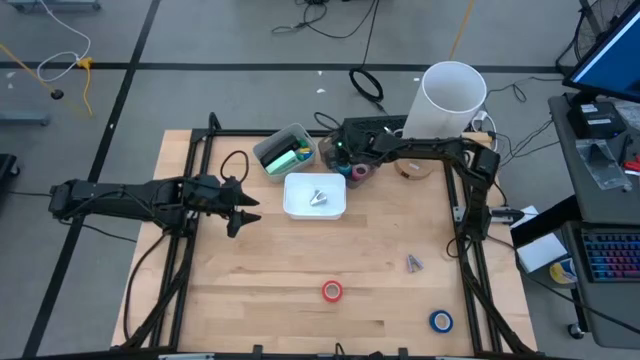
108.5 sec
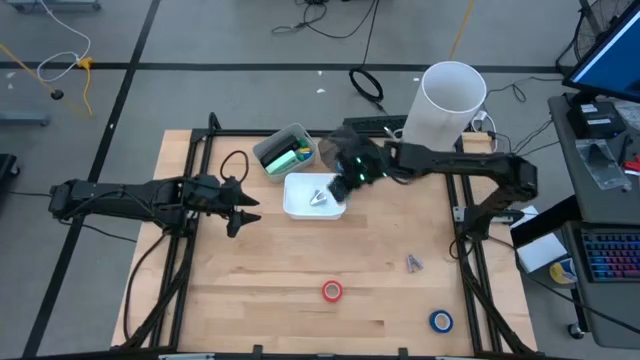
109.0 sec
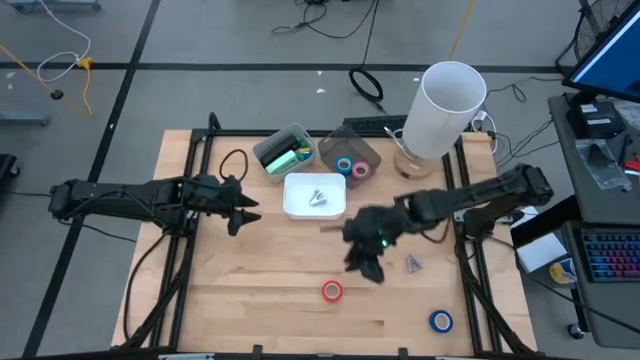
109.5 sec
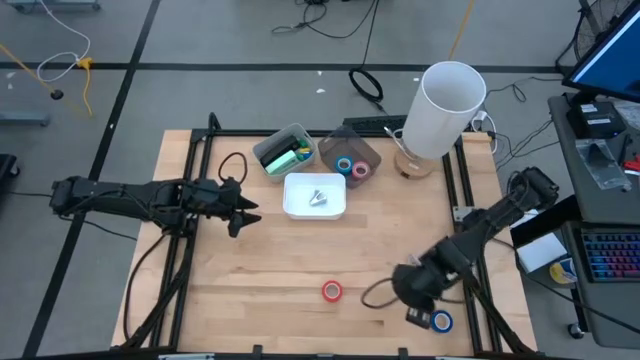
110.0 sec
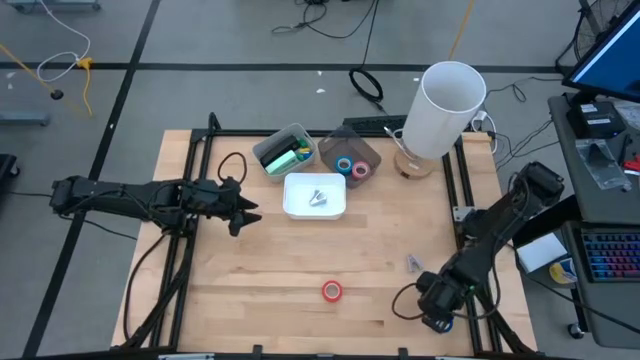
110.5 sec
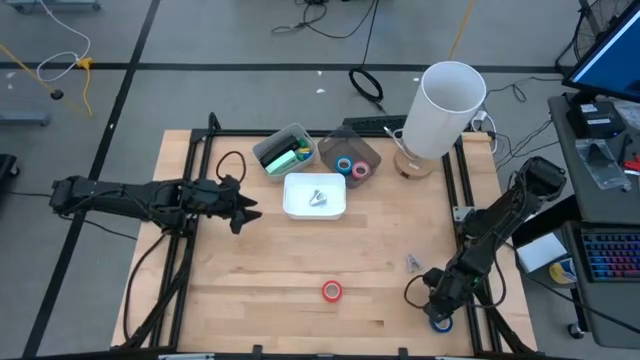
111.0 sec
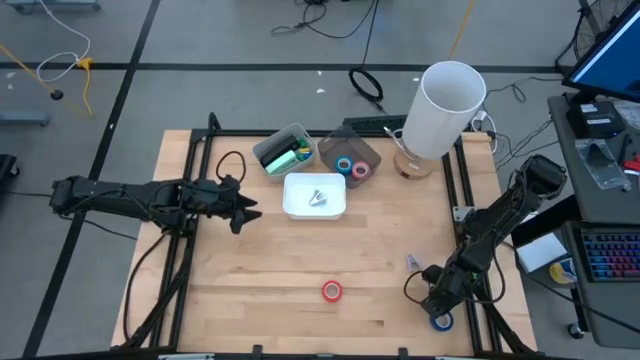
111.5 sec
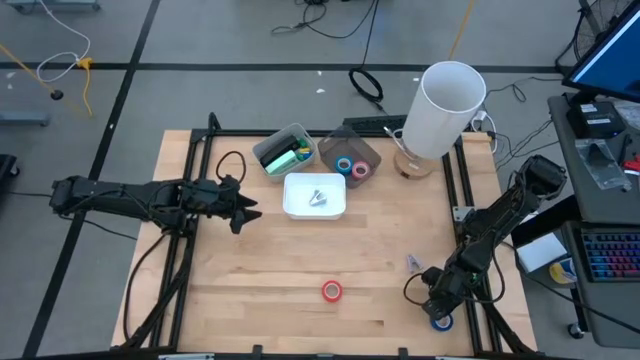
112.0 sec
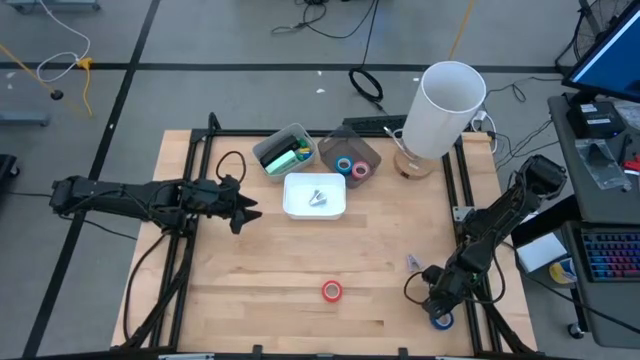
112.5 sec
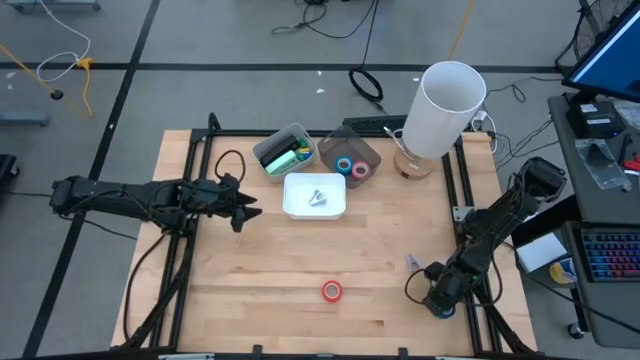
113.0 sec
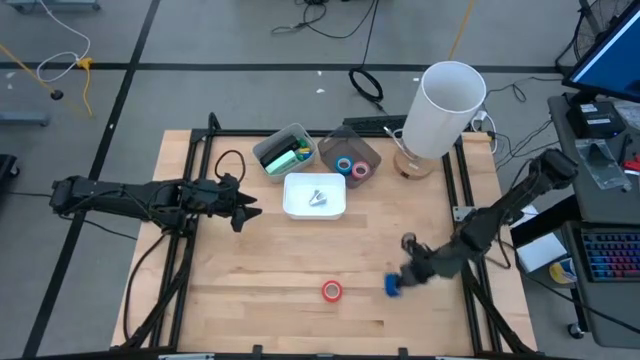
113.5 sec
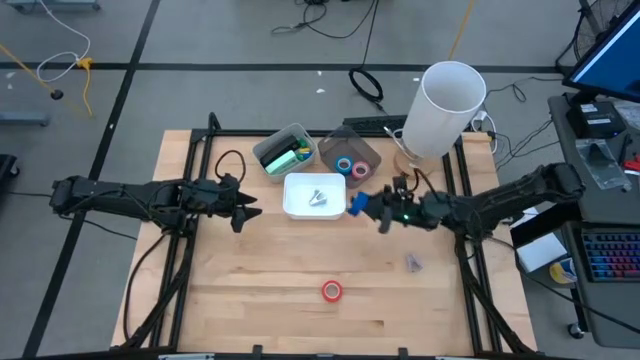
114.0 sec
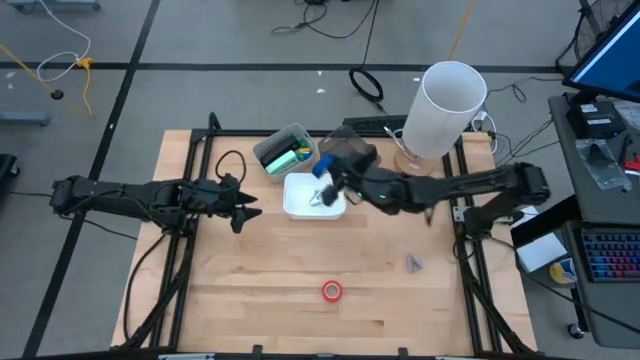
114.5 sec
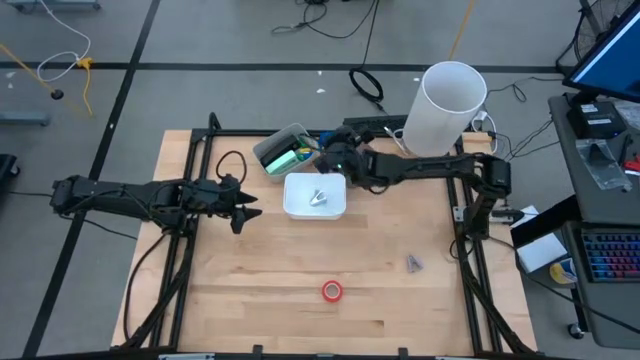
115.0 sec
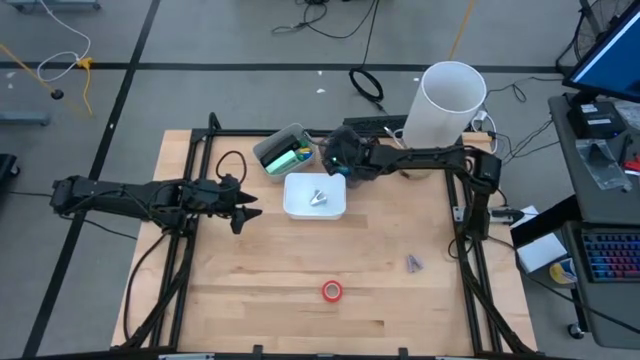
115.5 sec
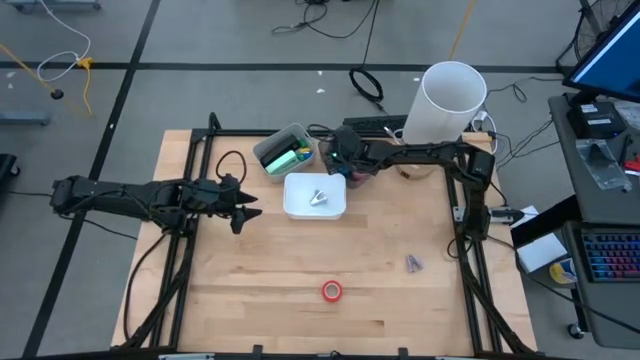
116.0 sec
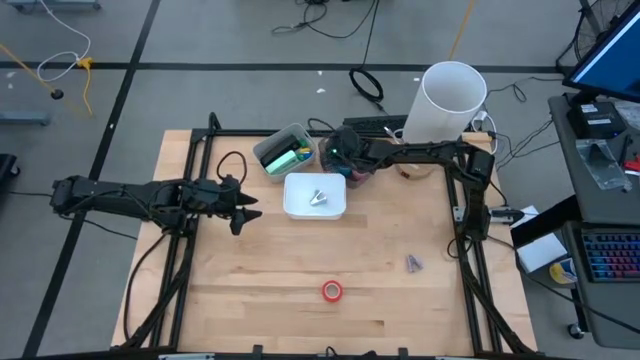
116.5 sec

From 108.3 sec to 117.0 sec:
Task: Pick and place Stapler, Stapler remover, tape
Put the blue tape into the black bin

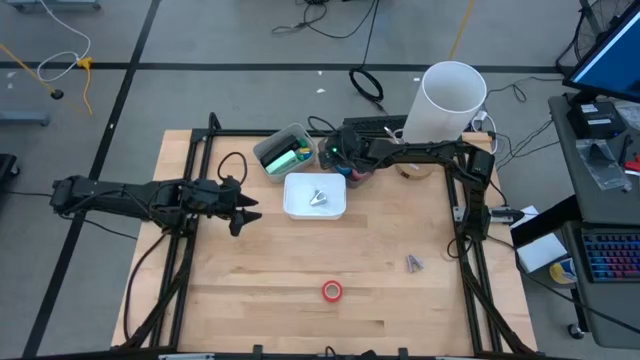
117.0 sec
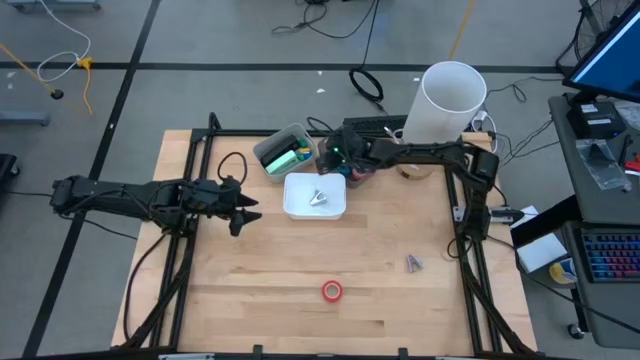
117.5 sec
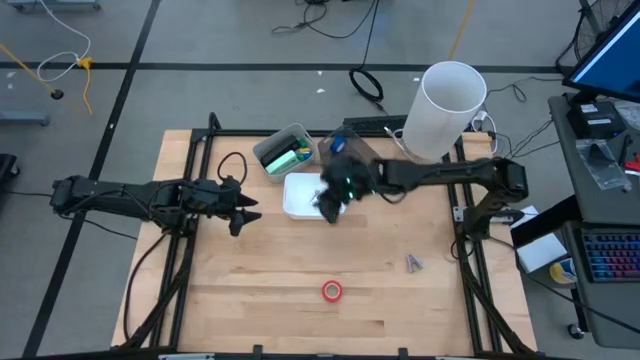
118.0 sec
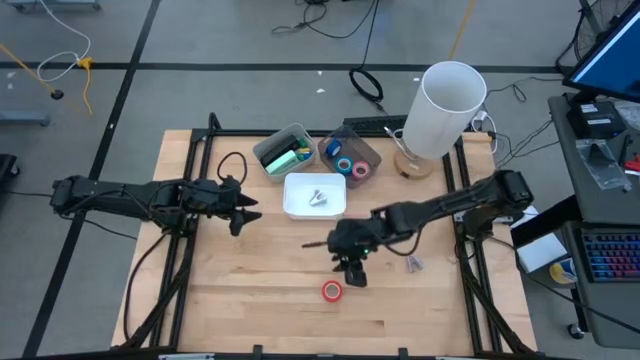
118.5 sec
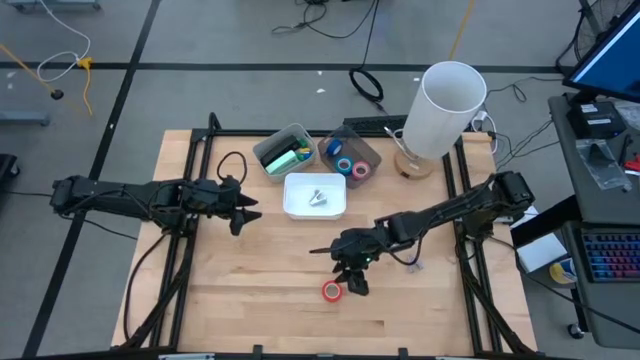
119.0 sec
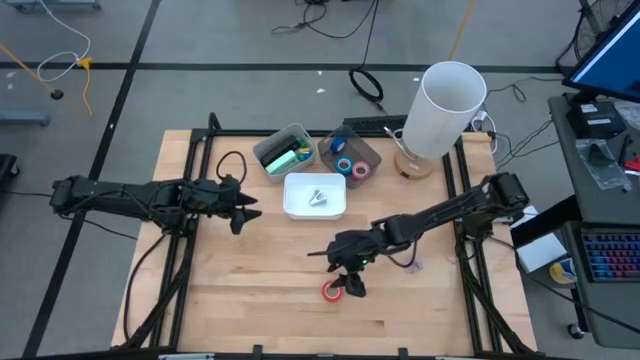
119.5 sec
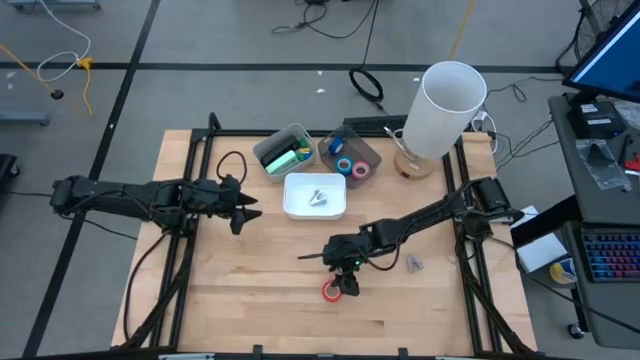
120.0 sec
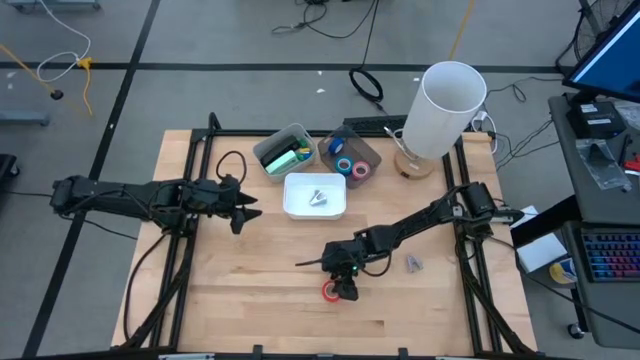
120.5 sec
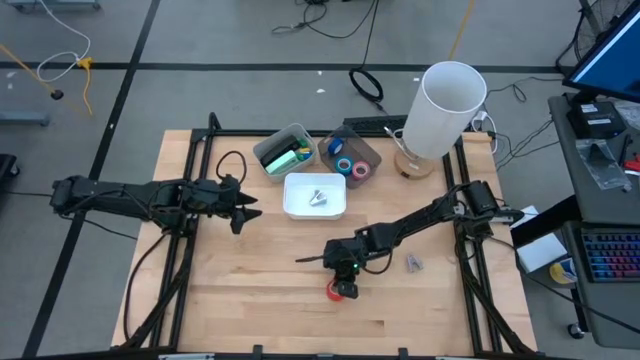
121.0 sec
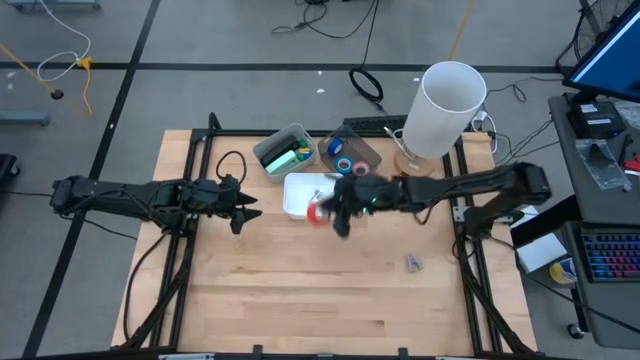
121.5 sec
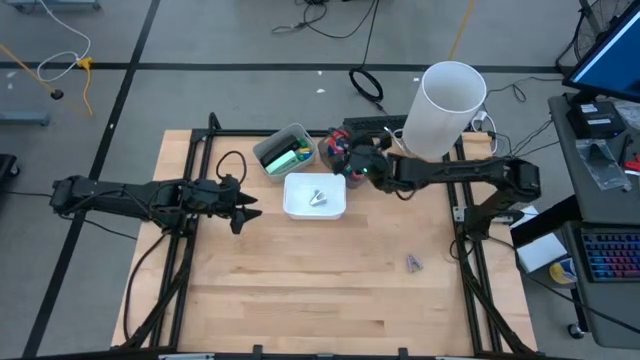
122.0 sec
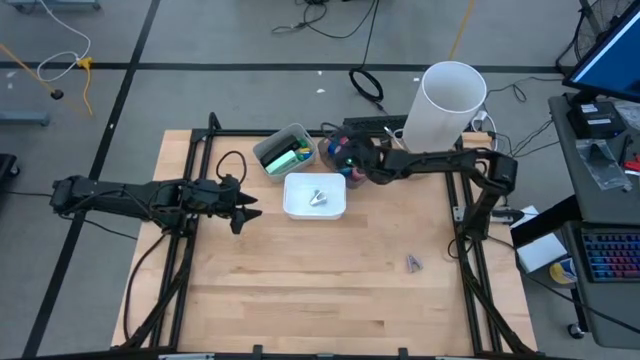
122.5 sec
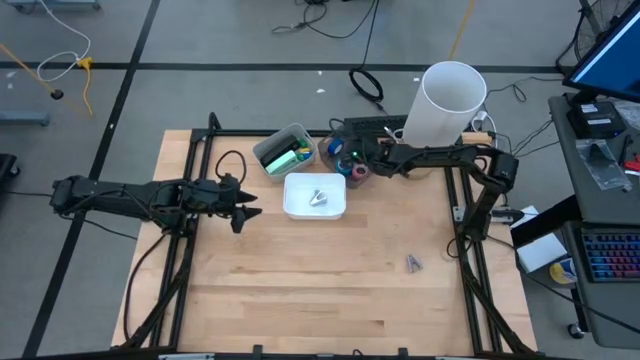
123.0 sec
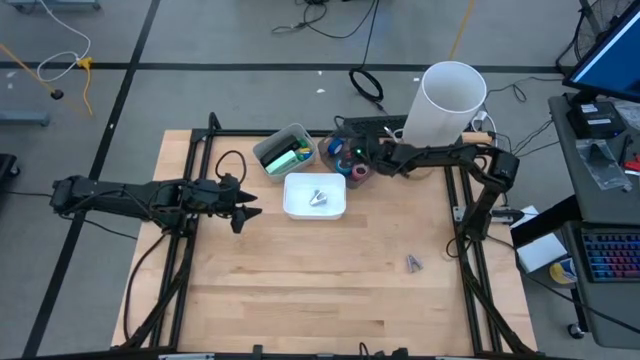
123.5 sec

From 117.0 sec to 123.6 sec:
Put the orange tape into the black bin
